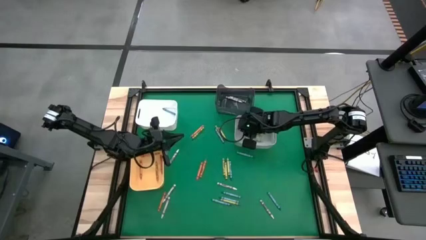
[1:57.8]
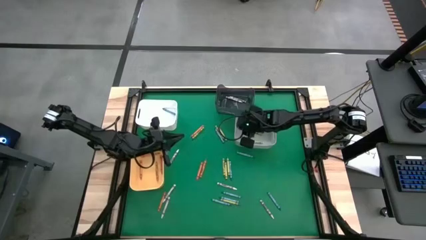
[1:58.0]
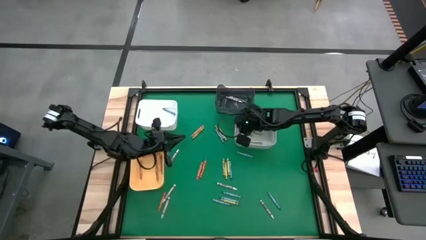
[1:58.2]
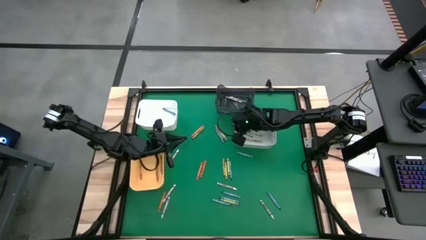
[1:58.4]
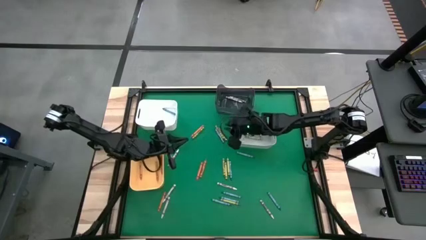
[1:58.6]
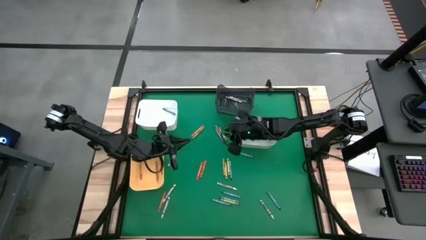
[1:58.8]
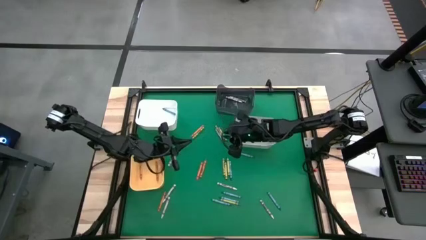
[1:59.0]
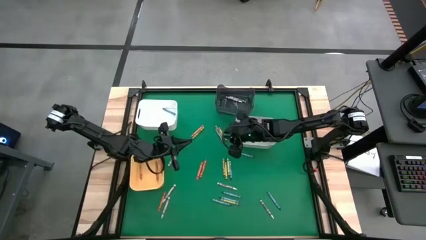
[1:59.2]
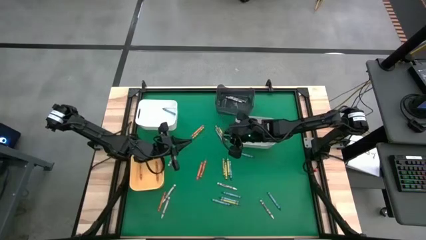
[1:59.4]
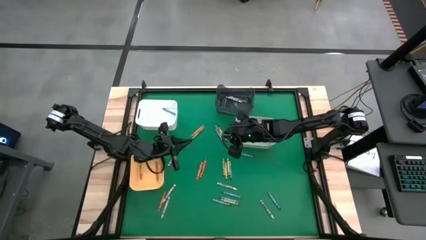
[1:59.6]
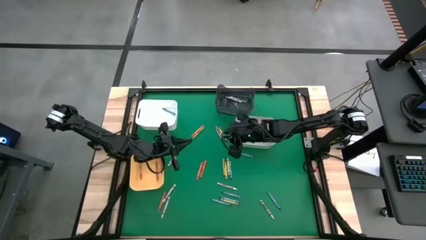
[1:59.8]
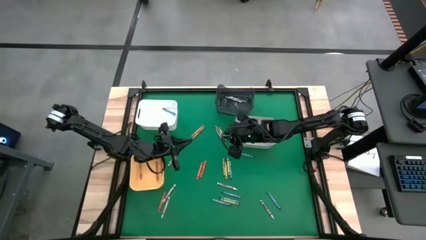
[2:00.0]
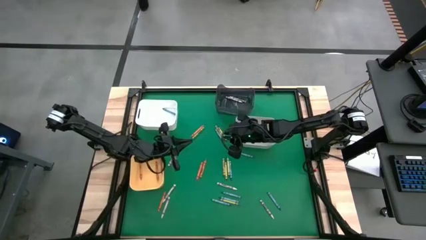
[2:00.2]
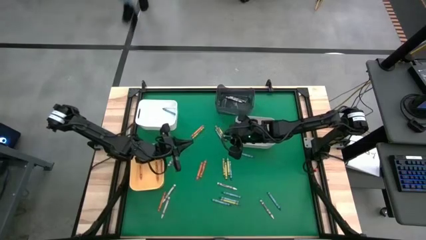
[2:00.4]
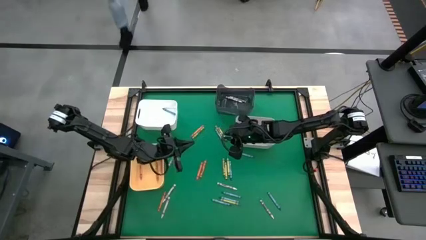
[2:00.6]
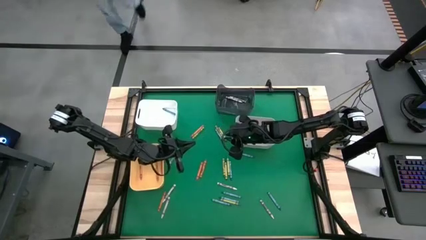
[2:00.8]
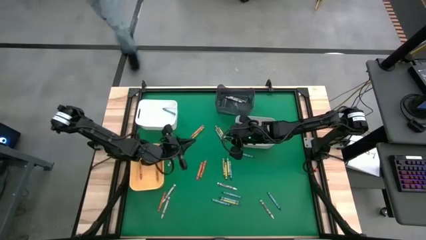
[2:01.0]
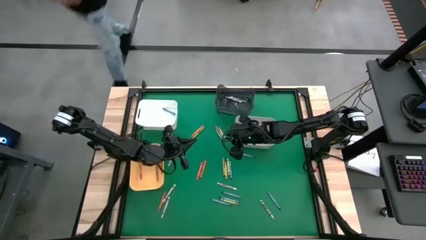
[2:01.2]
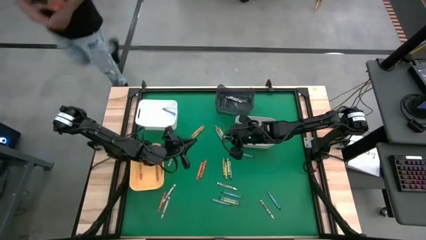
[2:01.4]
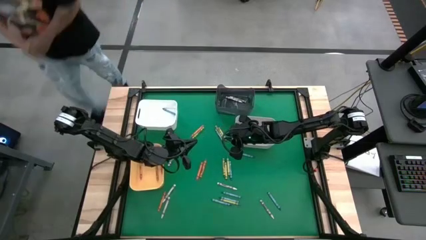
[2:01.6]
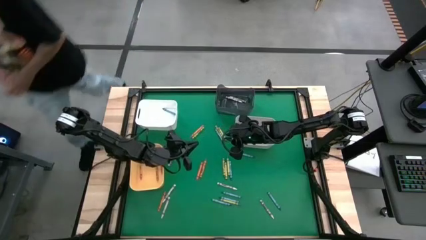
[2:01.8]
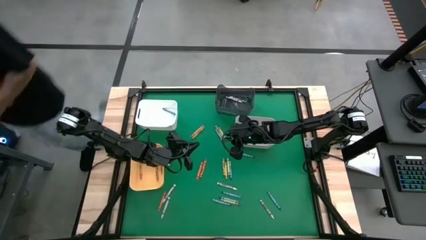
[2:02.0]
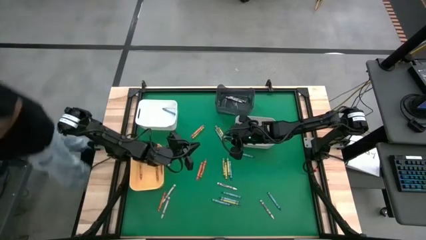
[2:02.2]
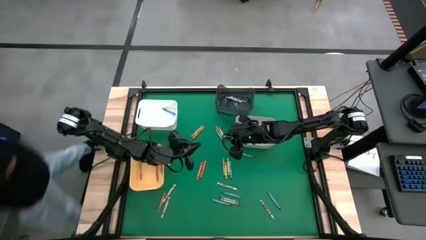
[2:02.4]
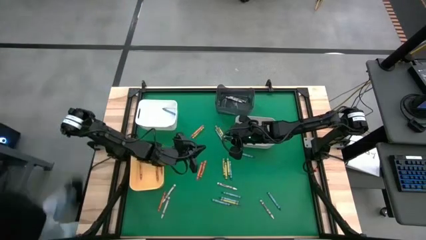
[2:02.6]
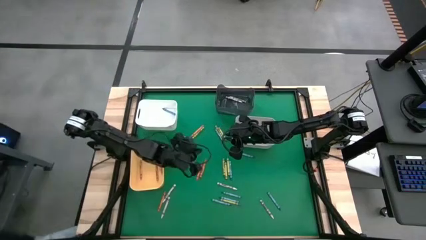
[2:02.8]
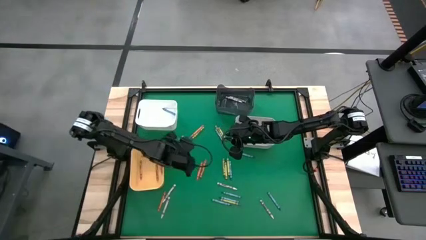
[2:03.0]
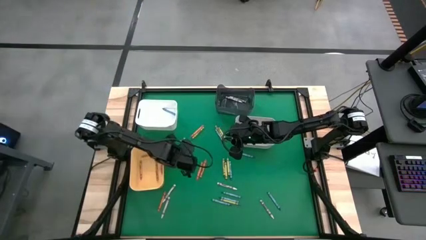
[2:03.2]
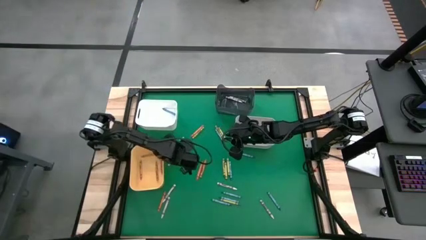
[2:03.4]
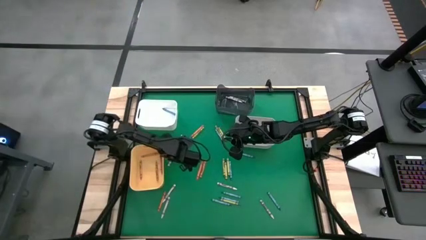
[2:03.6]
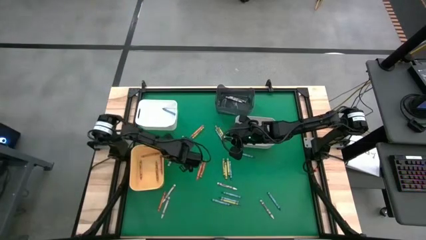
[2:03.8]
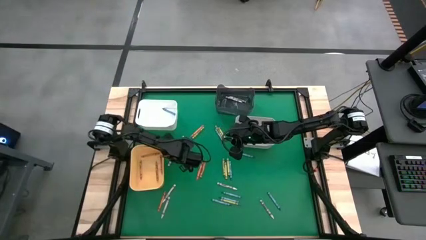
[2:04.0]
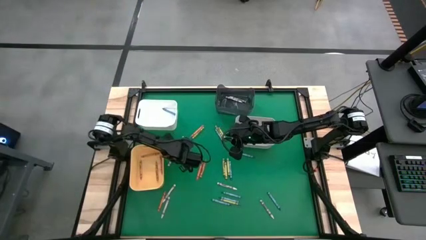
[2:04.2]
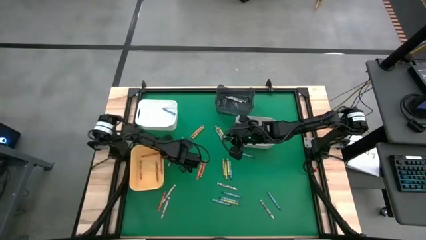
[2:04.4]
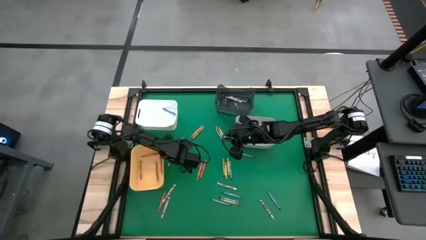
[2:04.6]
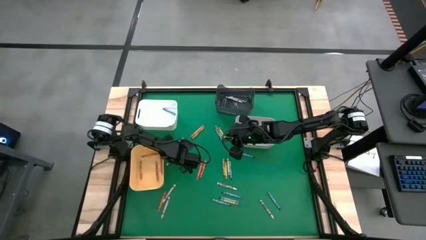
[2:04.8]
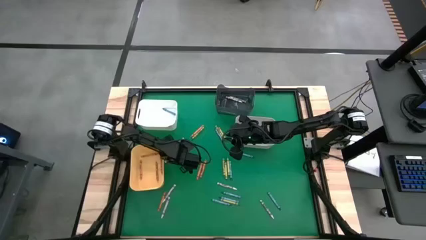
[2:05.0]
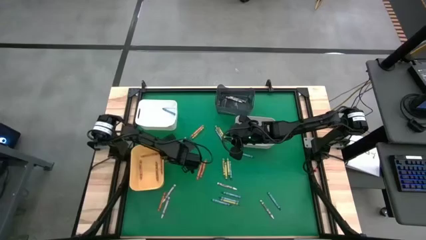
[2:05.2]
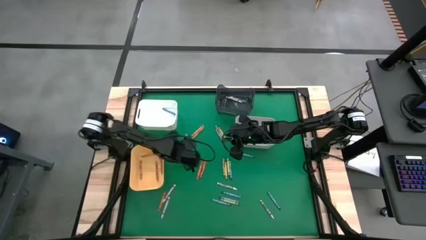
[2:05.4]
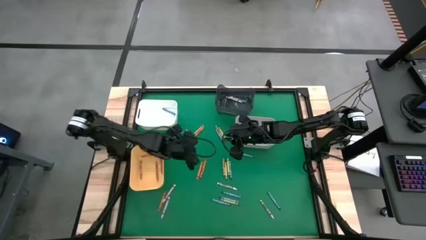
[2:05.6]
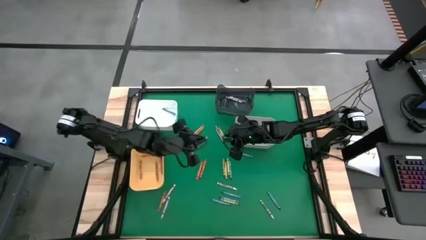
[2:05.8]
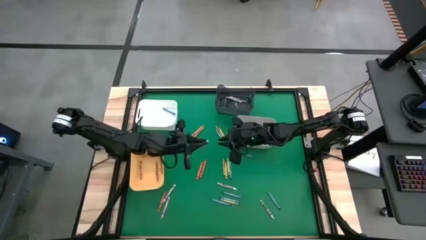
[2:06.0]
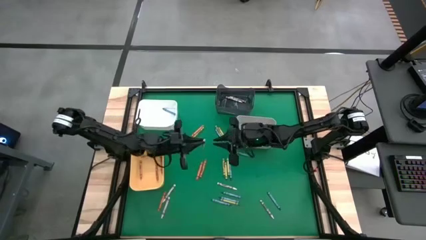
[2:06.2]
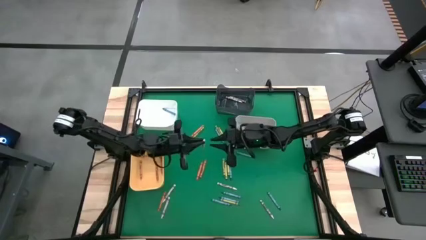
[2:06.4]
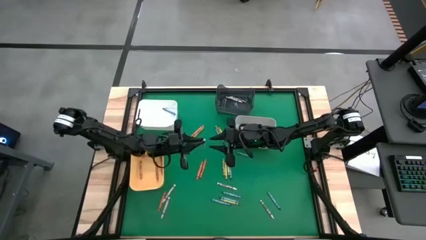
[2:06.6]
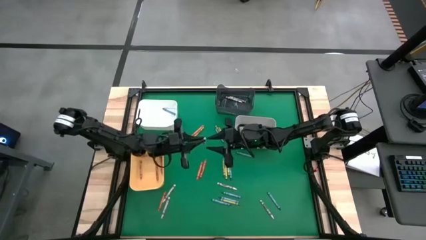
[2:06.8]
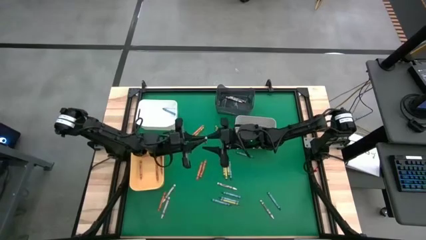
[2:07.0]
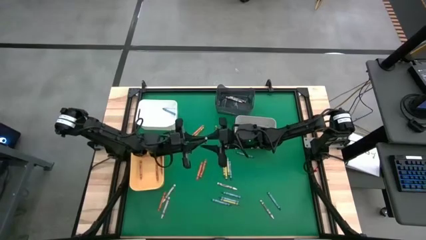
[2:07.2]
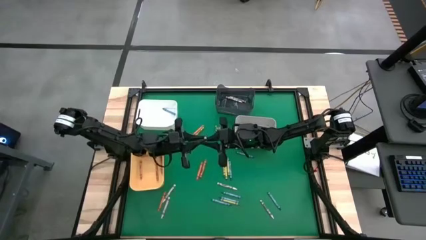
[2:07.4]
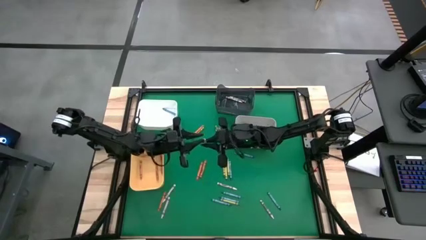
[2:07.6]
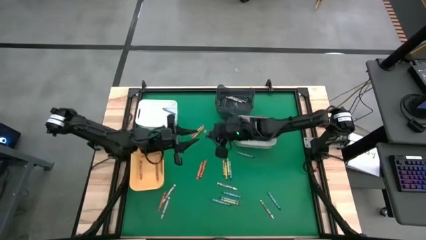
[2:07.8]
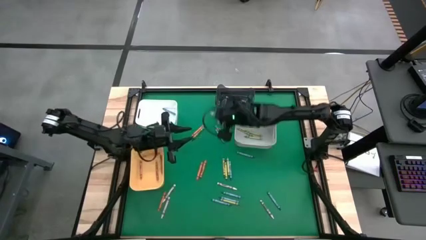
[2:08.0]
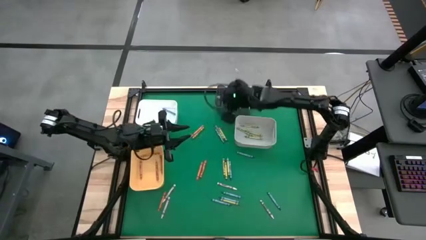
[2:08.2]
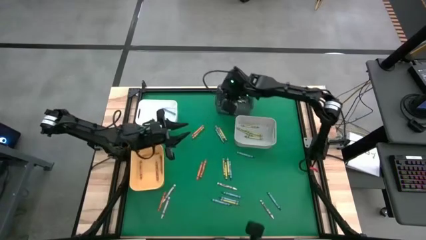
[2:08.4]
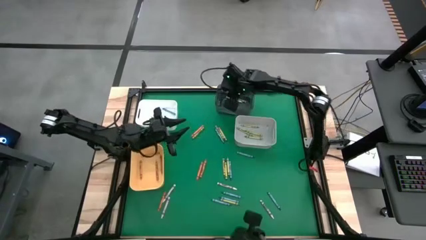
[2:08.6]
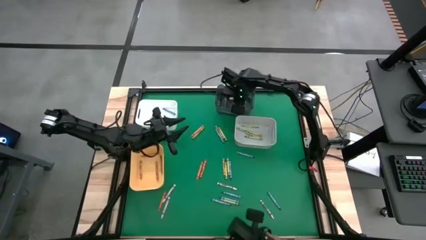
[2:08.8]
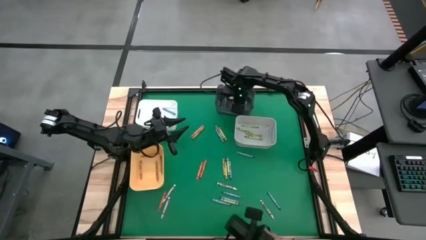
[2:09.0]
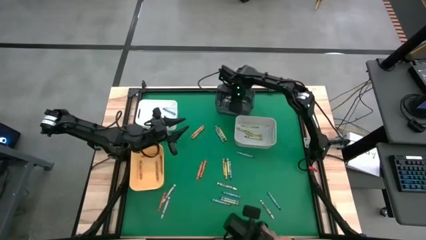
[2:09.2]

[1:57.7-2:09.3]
Task: Sort crayons
Put the white crayon into the black bin

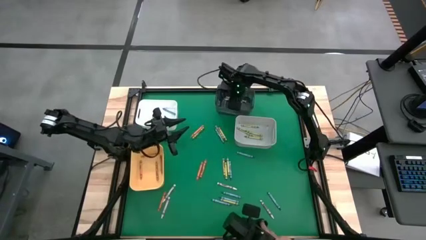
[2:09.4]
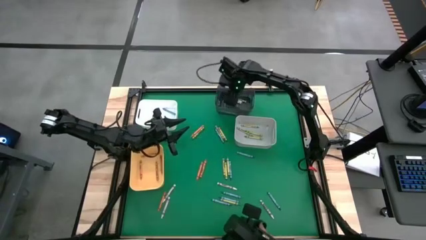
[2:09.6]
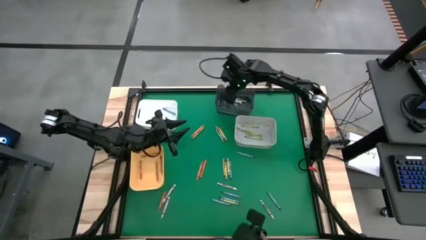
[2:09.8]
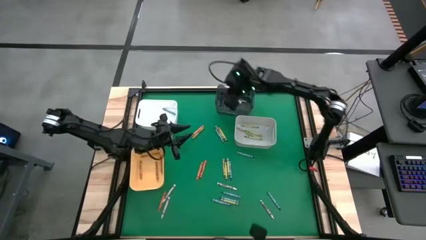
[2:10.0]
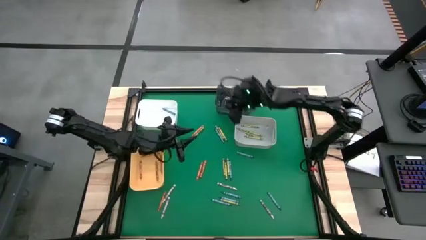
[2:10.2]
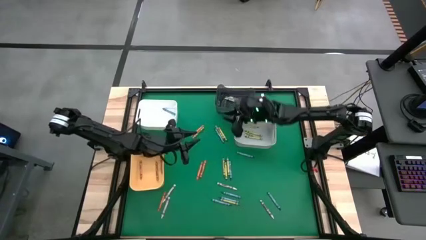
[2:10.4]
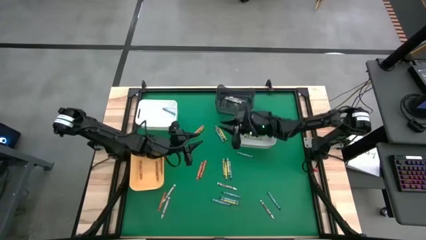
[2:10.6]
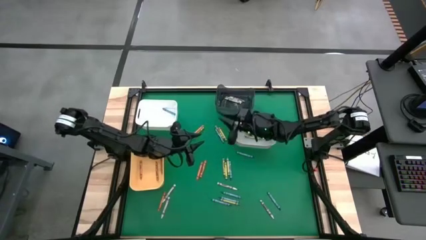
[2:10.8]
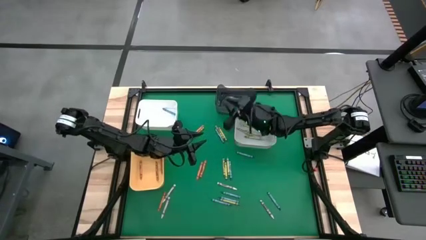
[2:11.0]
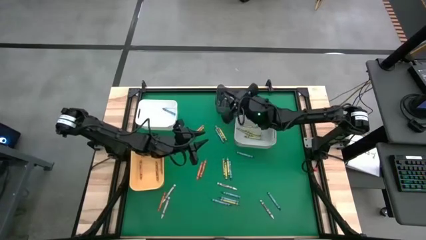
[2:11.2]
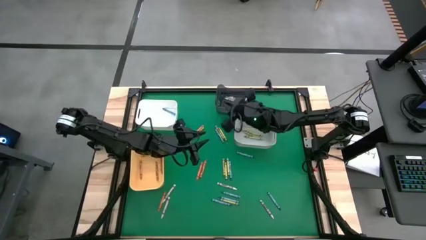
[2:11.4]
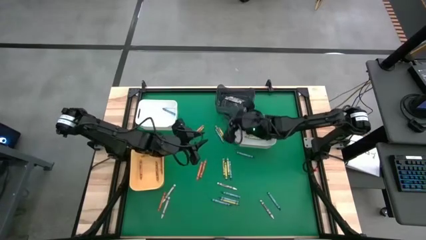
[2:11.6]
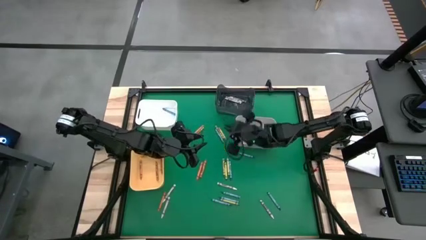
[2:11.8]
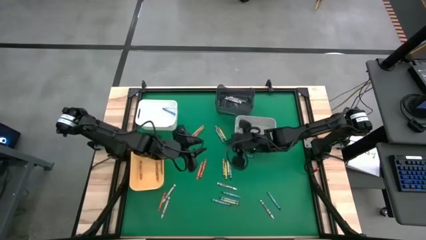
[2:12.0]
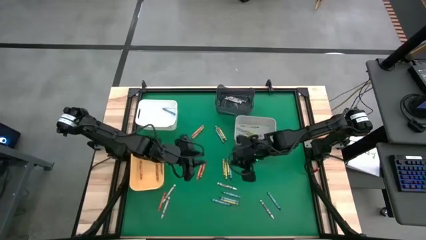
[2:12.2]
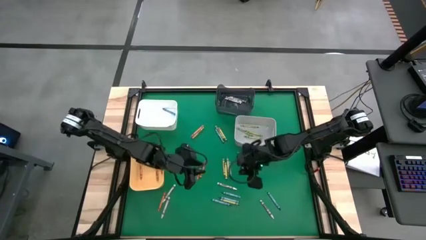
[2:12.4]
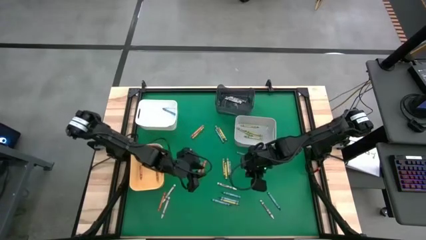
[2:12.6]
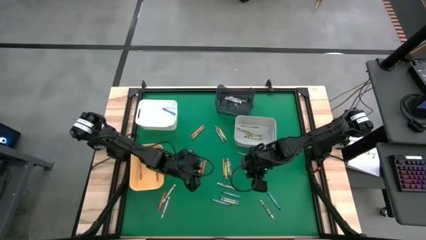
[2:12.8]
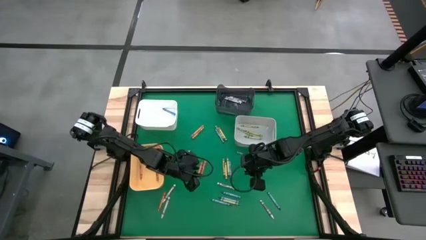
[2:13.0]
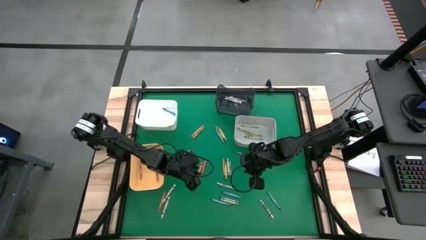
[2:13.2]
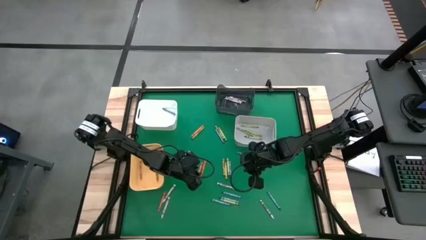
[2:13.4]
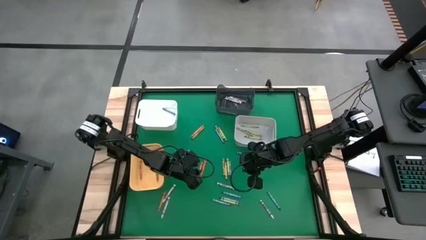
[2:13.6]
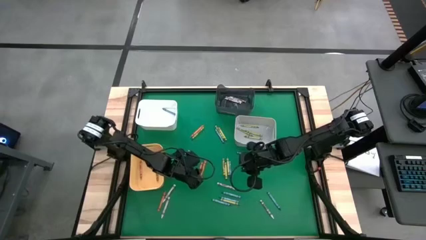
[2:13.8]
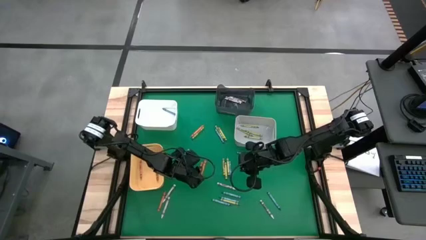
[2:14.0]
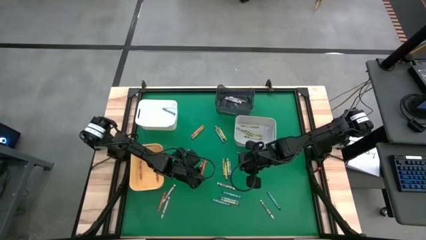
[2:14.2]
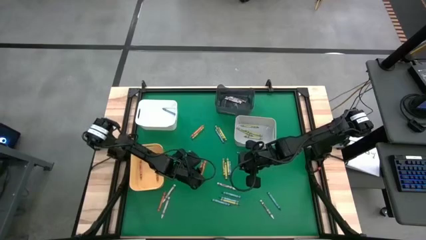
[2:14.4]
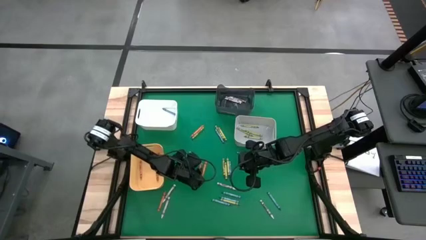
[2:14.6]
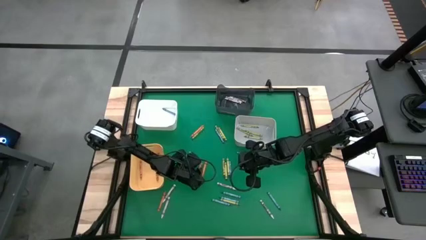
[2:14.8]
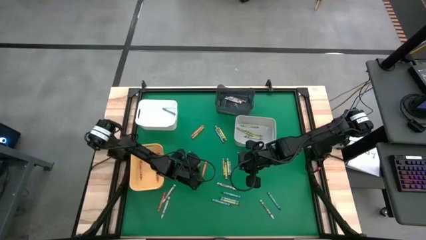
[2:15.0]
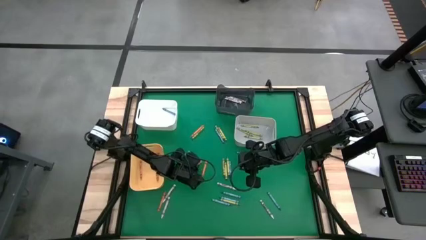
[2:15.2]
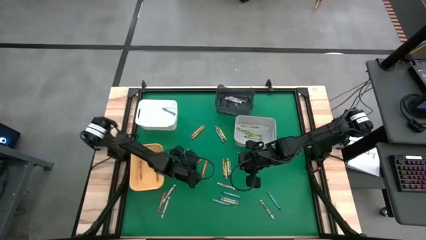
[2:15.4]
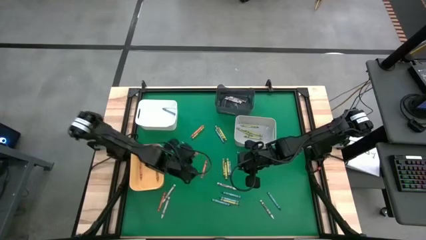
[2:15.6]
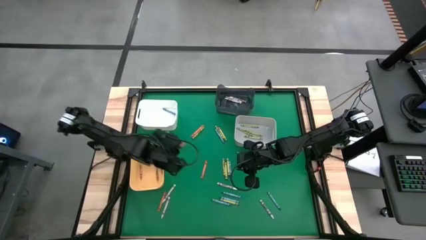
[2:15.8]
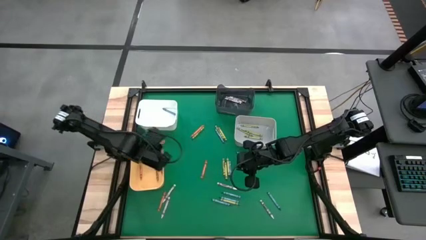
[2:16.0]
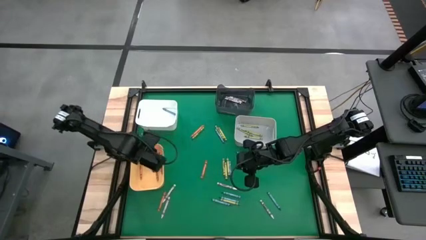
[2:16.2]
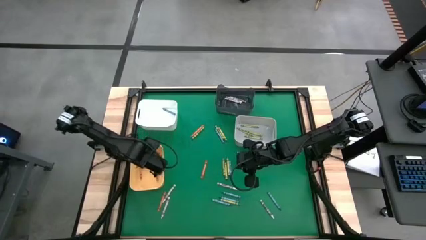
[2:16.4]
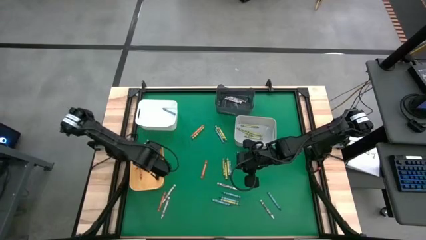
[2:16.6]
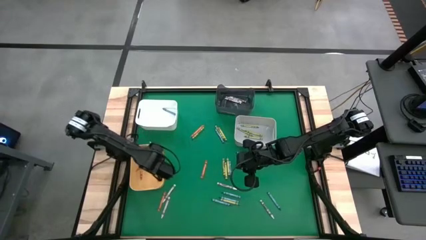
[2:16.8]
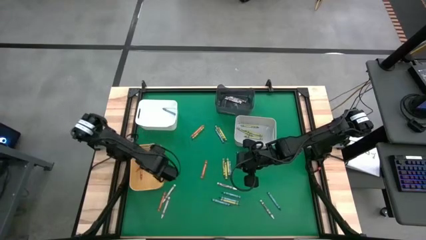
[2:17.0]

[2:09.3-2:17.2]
Put the orange crayon into the orange bin
